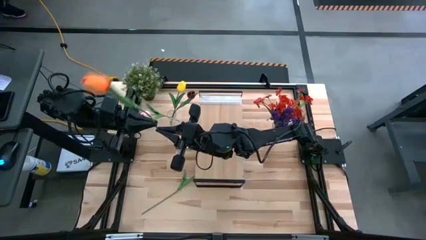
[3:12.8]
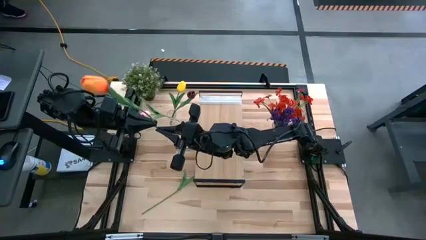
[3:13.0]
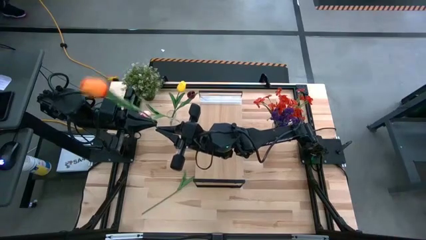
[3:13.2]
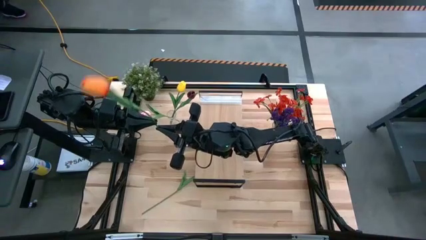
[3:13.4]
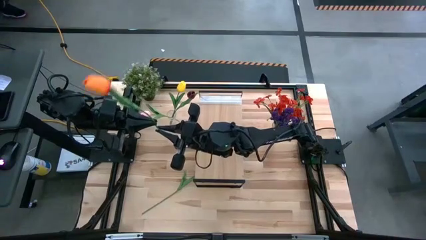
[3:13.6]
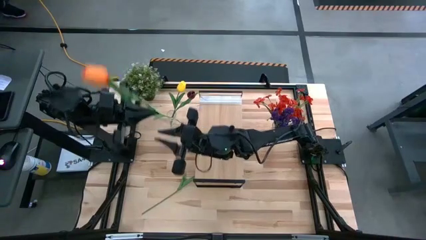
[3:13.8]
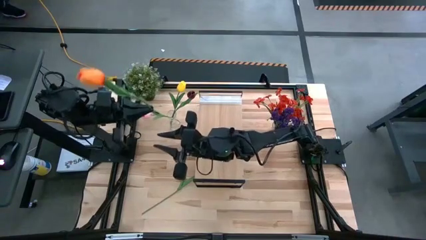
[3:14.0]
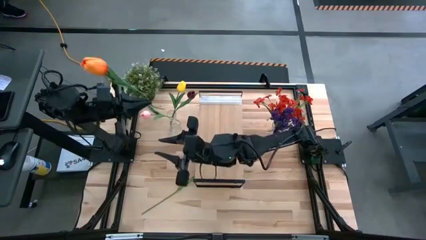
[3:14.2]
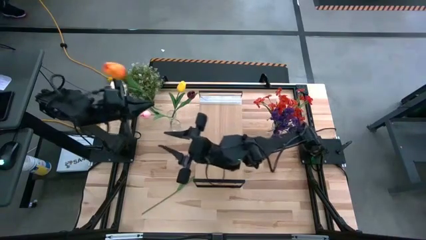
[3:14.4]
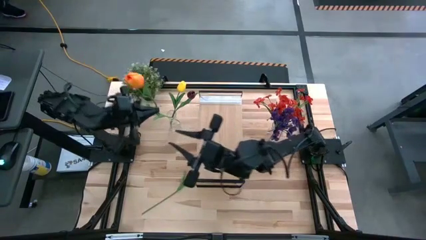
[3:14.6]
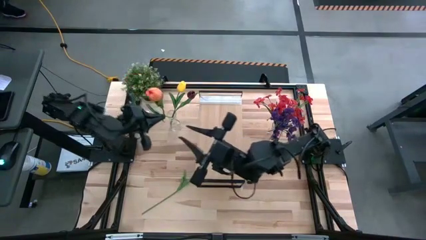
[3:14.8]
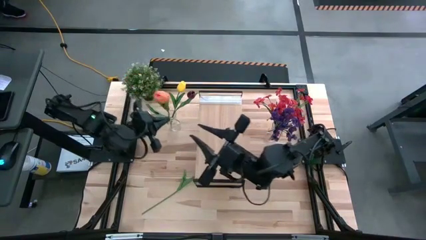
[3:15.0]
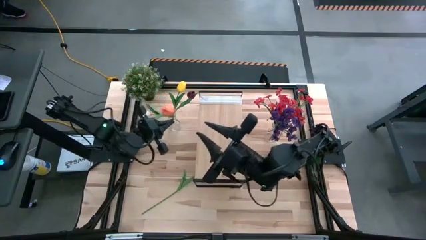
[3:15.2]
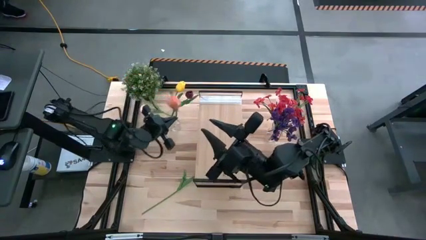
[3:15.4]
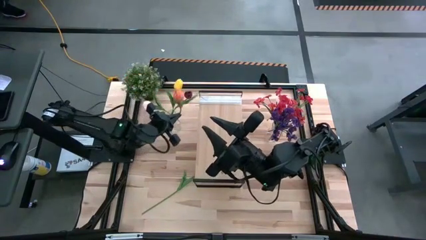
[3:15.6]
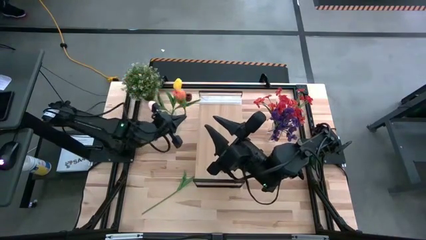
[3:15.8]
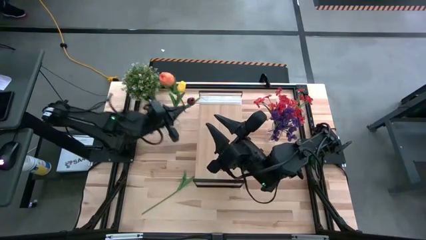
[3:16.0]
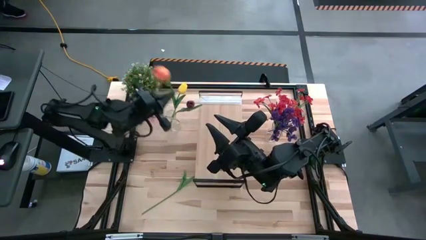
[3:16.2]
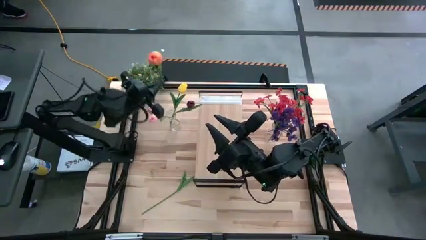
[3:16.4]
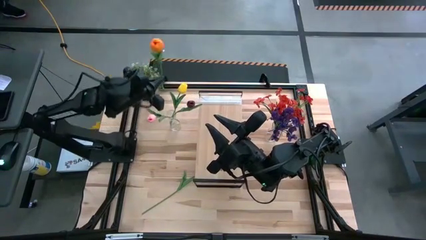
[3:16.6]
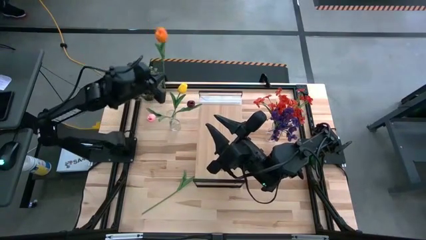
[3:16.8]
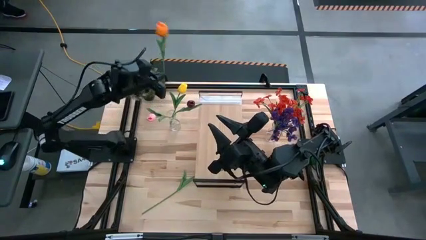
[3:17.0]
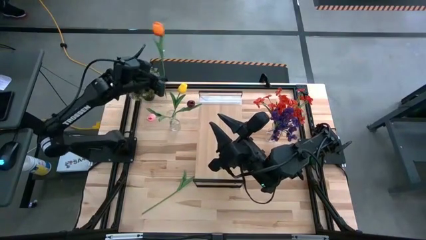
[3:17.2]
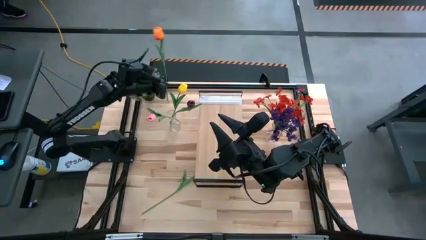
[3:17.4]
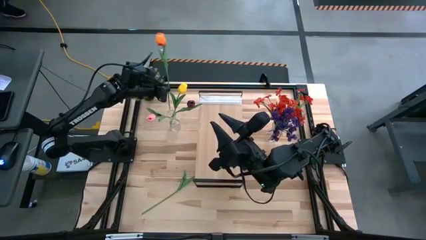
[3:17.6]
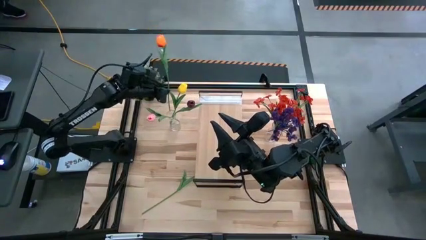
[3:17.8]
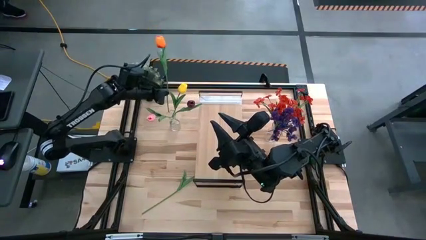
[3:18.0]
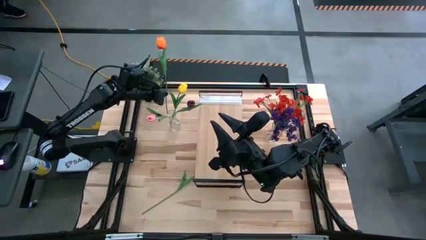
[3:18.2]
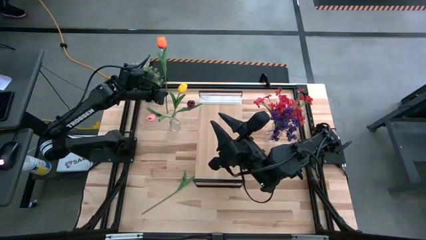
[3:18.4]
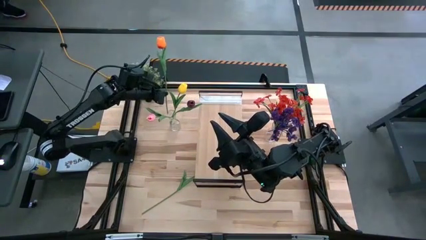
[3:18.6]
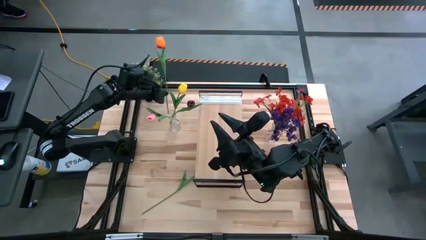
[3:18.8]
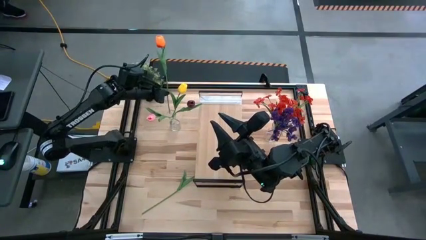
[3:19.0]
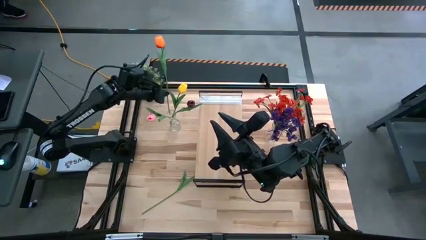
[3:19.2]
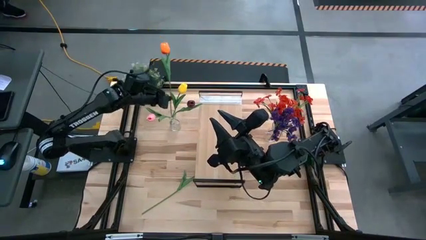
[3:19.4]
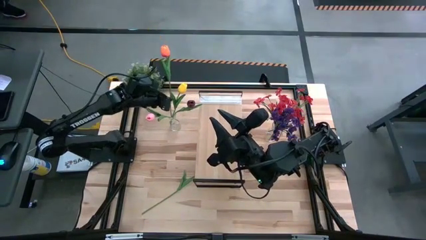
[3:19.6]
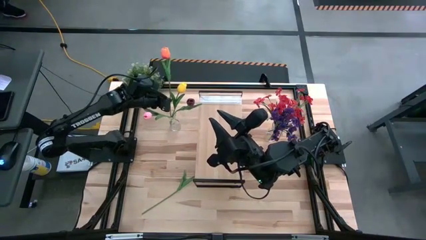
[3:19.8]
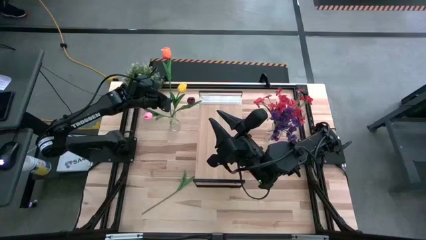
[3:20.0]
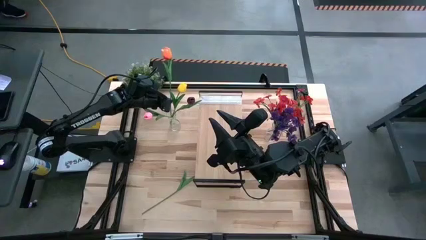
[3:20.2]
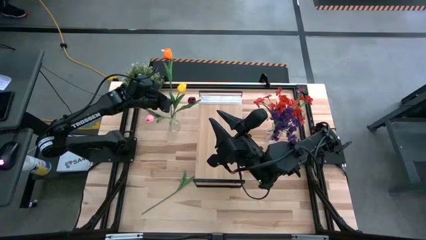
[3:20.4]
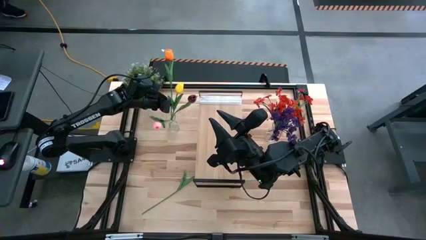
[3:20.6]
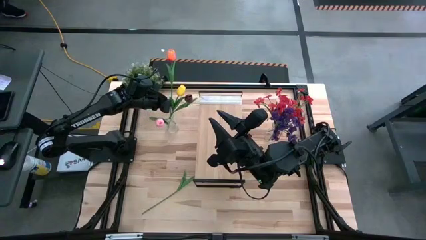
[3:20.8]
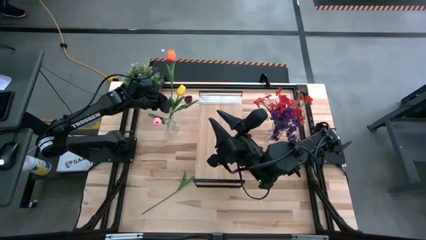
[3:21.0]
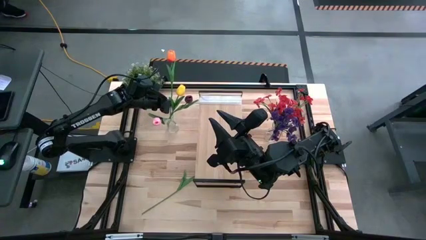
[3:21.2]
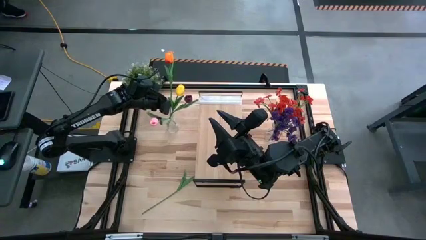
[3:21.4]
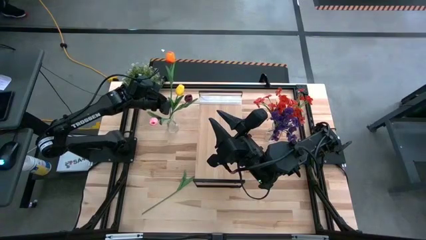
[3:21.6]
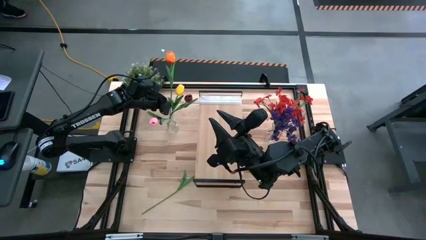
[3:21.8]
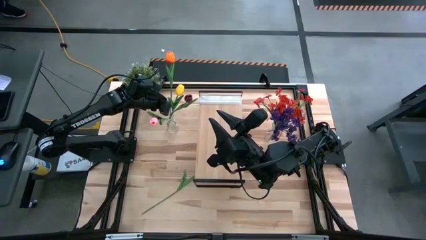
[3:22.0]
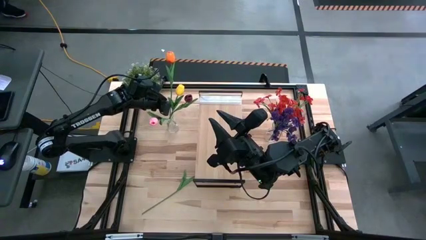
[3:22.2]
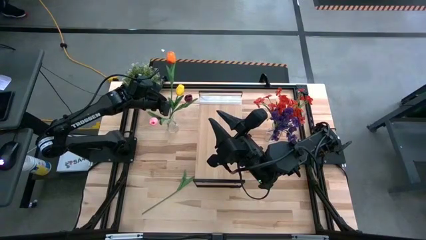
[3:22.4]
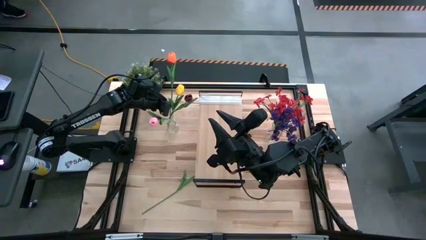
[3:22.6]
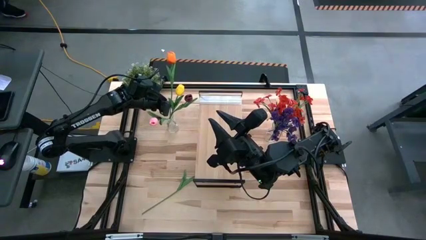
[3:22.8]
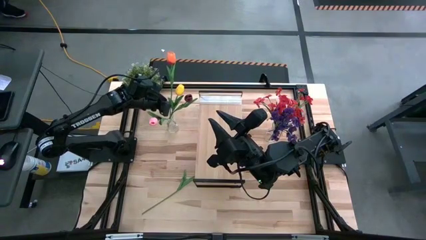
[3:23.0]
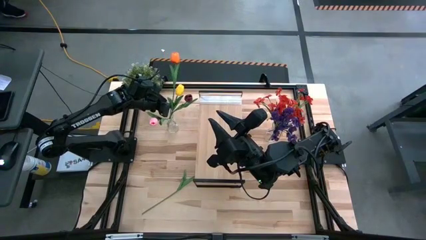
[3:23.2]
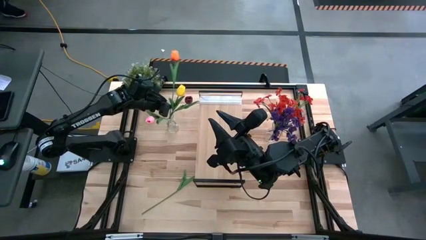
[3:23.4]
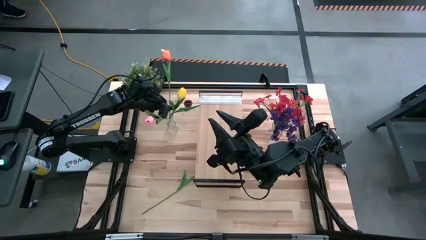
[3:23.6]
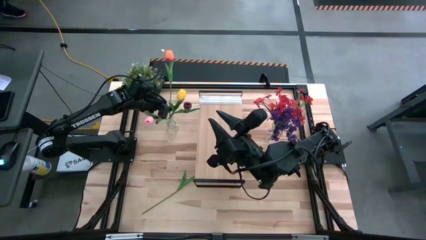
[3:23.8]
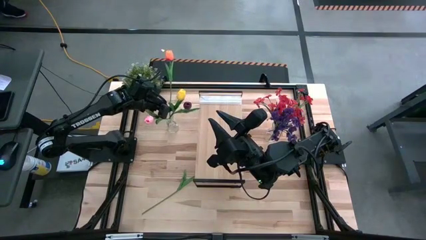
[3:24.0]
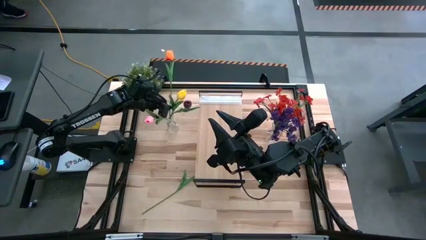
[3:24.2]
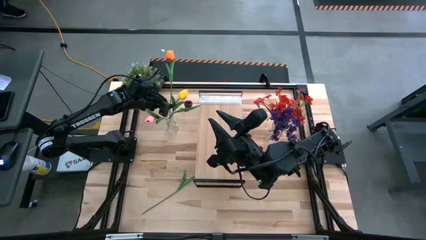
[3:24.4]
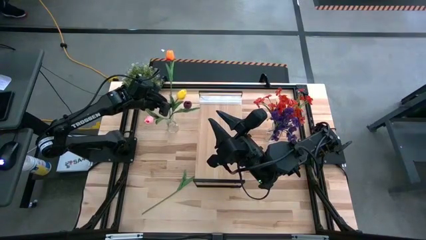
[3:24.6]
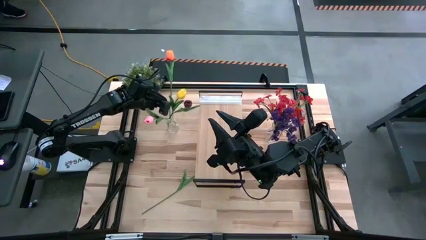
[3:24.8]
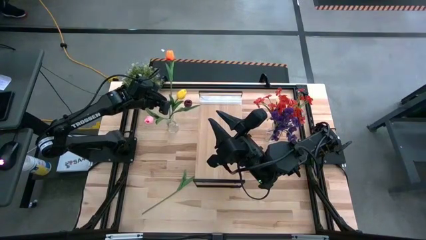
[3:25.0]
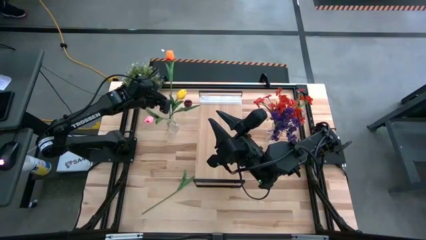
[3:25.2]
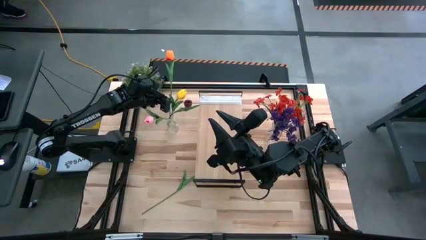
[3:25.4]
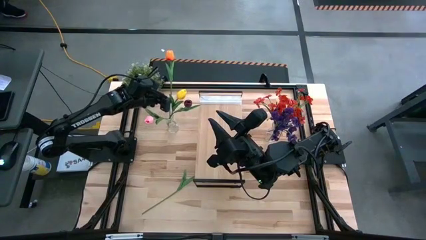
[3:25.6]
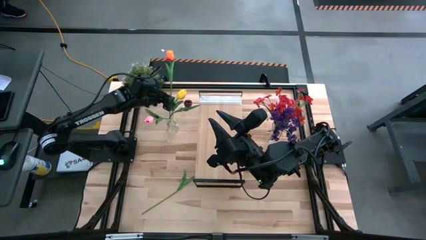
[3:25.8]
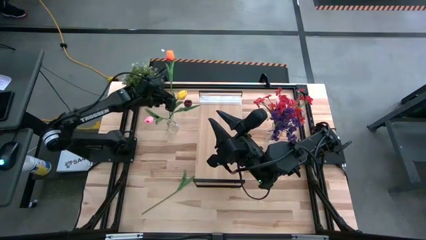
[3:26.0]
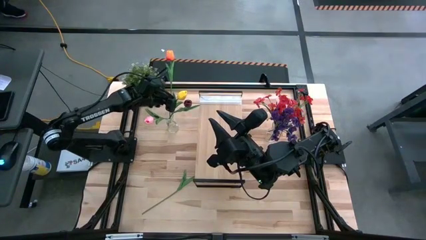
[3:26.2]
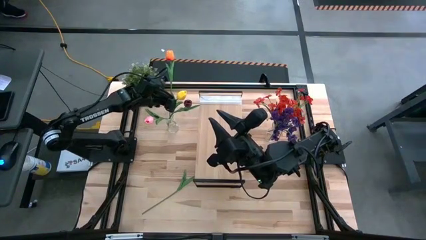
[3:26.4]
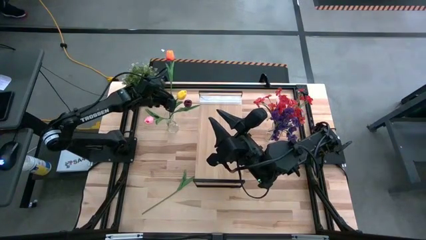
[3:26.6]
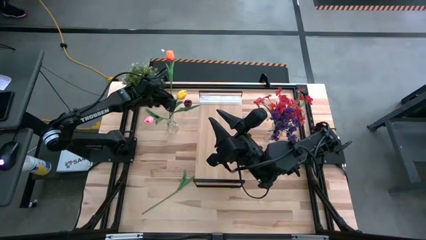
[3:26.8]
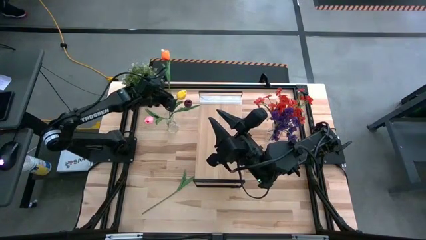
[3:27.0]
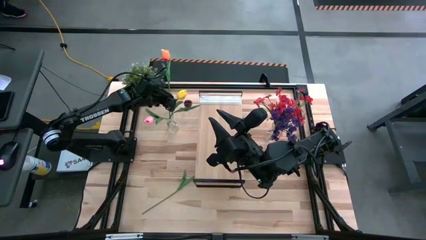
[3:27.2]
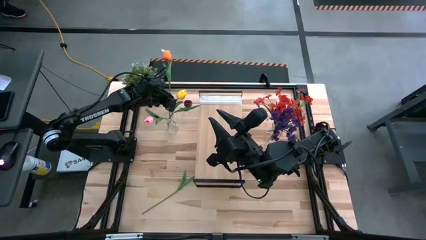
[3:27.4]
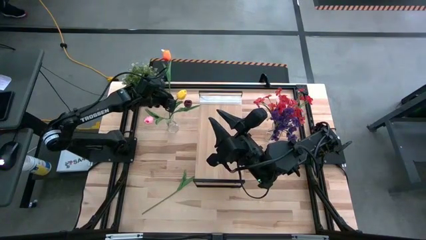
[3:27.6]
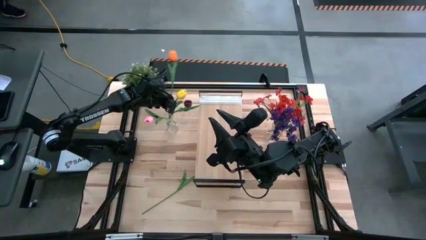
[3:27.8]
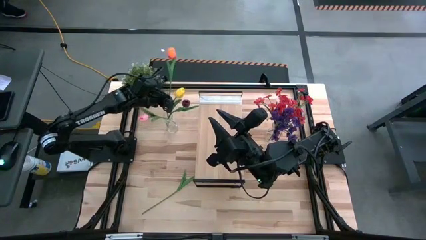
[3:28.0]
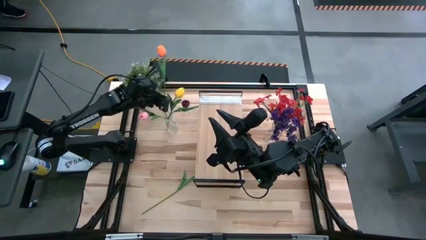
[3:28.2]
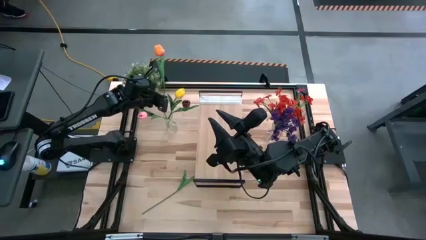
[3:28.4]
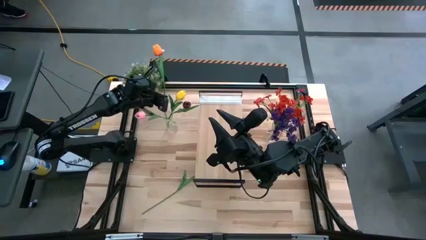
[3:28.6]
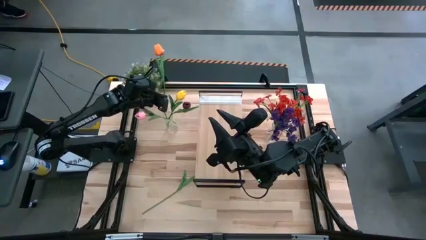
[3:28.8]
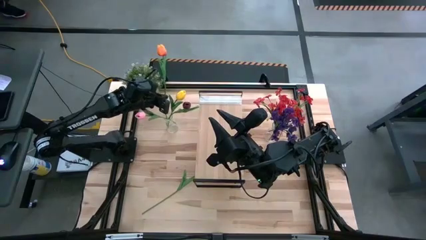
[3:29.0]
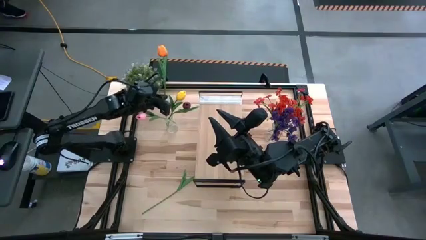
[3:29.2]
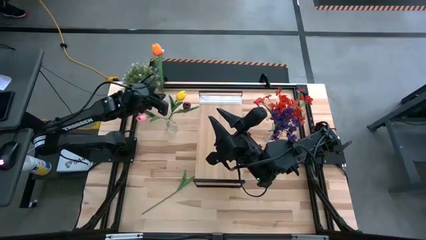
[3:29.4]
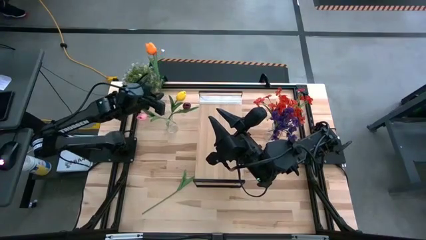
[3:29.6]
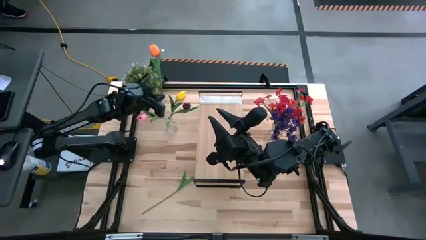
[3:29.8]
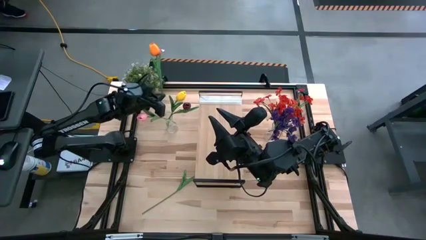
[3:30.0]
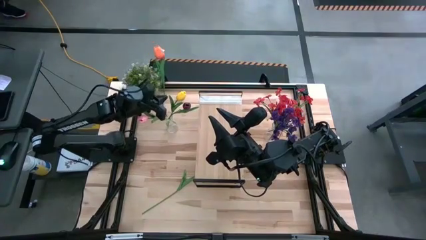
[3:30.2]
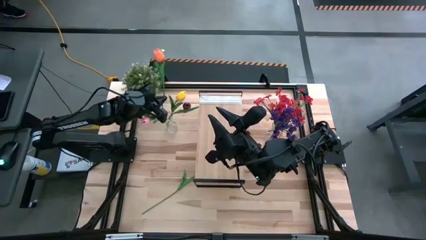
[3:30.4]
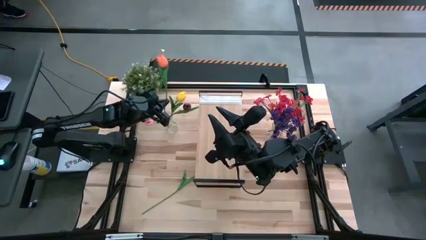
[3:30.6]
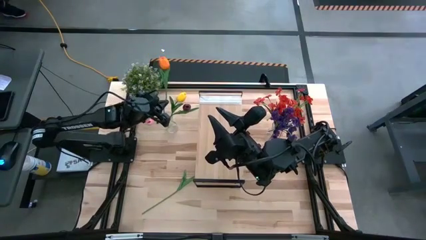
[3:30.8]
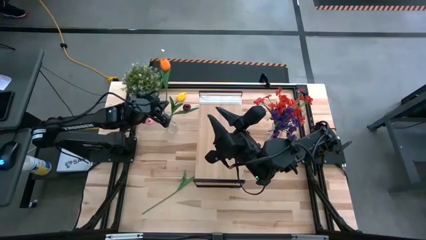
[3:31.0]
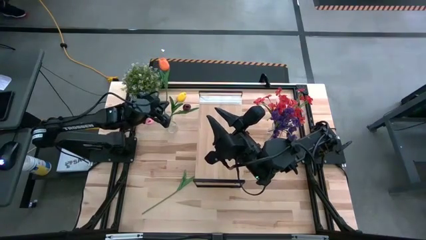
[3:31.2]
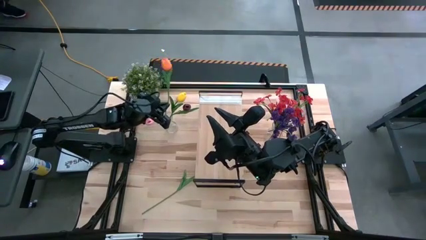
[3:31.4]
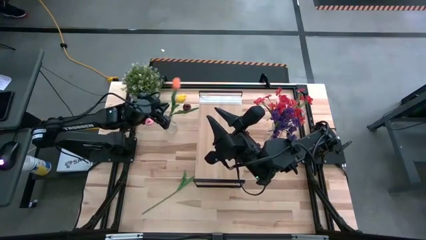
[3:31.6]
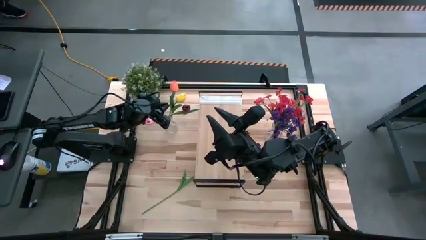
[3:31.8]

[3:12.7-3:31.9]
Task: Pick and place flowers into a vace then onto a shelf
Put the orange tulip into the left transparent vase
